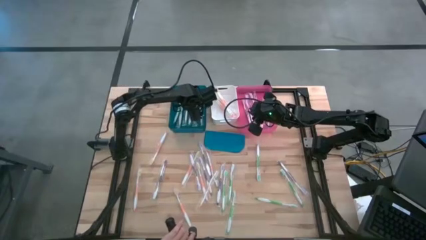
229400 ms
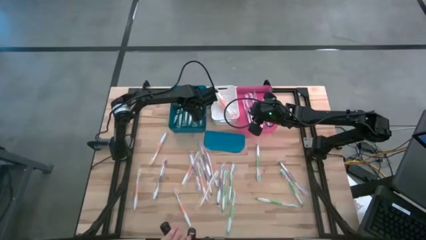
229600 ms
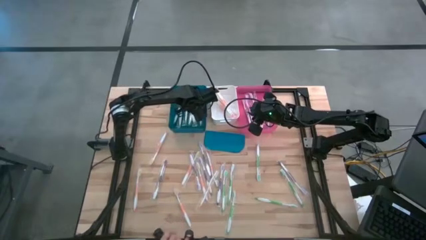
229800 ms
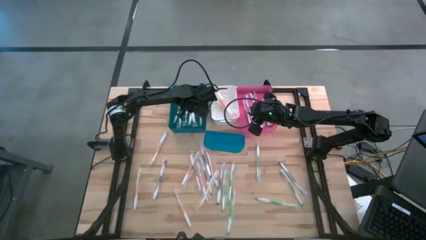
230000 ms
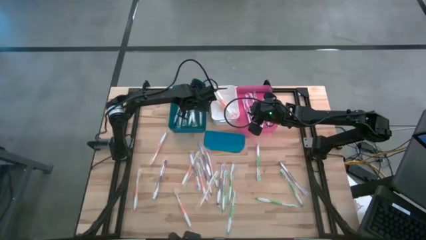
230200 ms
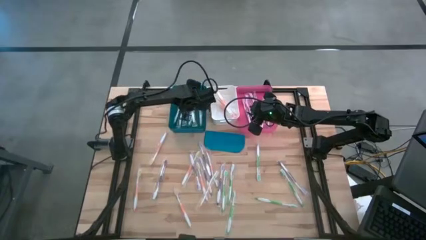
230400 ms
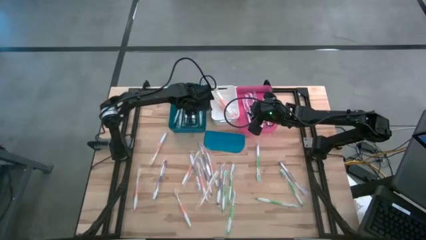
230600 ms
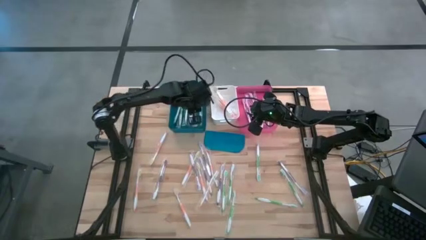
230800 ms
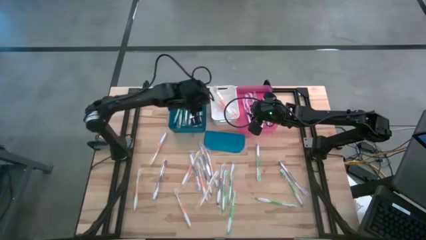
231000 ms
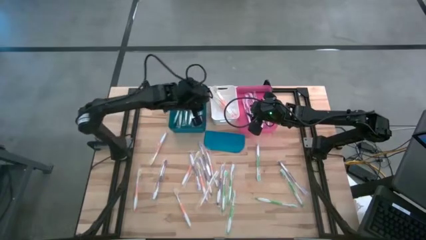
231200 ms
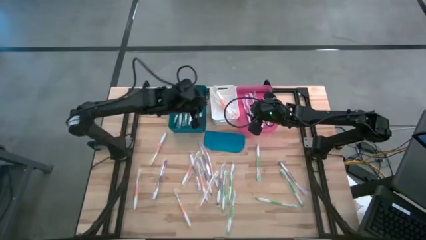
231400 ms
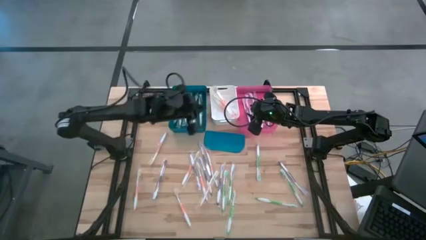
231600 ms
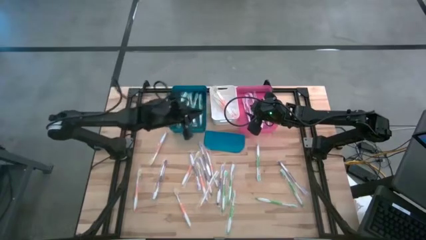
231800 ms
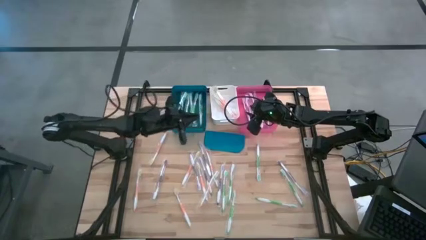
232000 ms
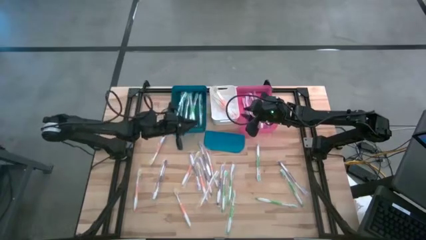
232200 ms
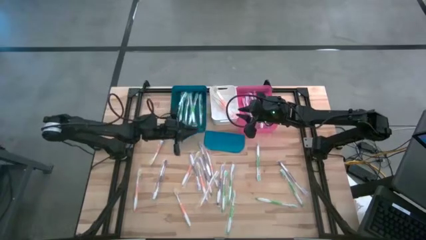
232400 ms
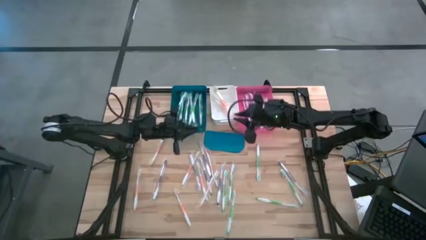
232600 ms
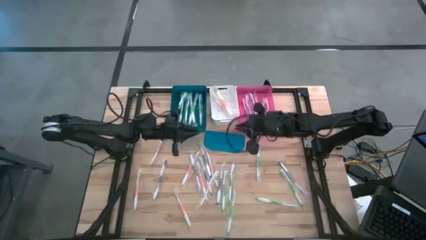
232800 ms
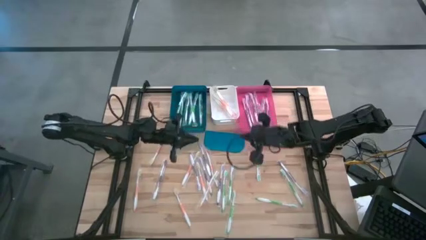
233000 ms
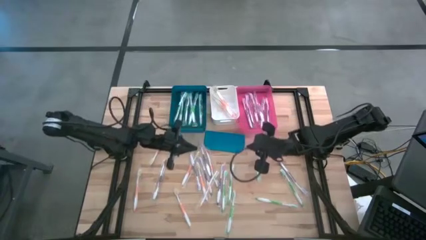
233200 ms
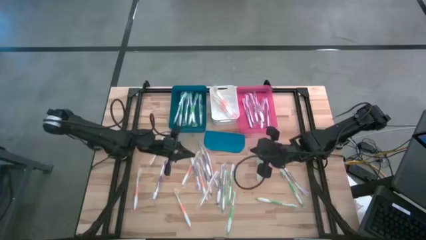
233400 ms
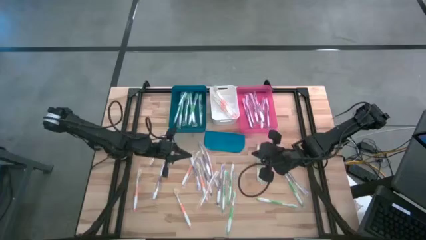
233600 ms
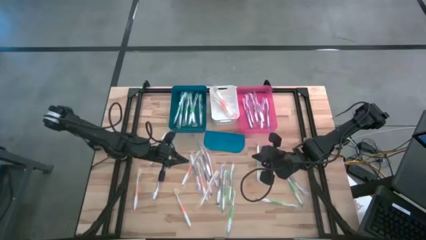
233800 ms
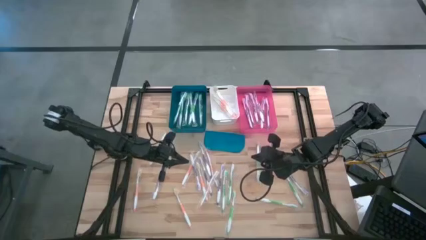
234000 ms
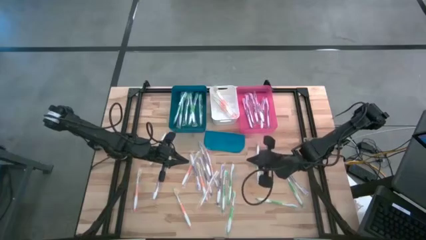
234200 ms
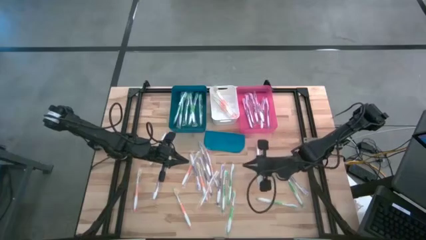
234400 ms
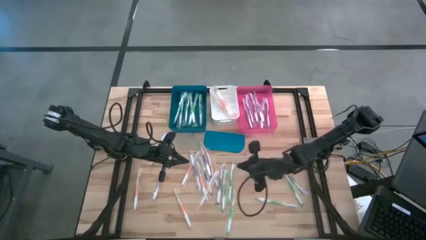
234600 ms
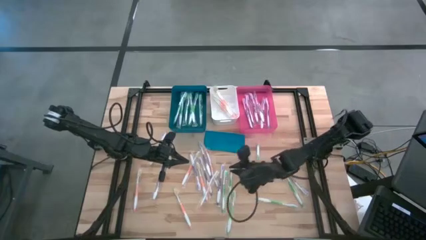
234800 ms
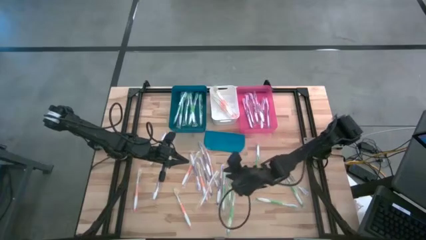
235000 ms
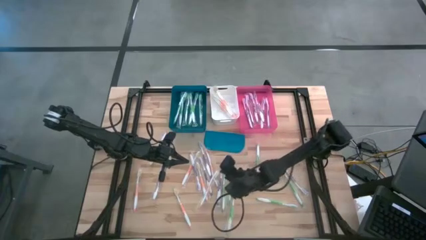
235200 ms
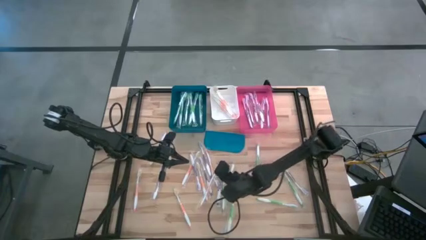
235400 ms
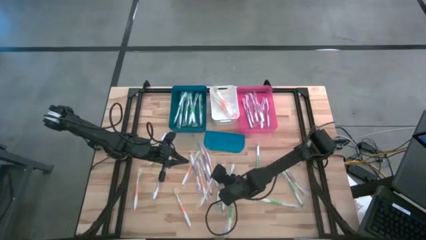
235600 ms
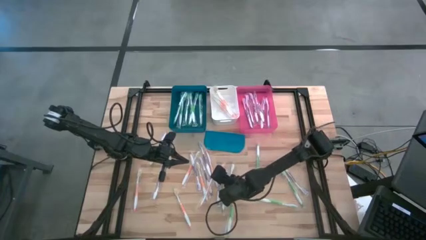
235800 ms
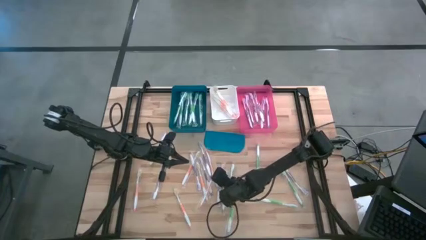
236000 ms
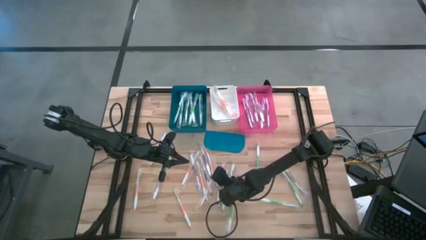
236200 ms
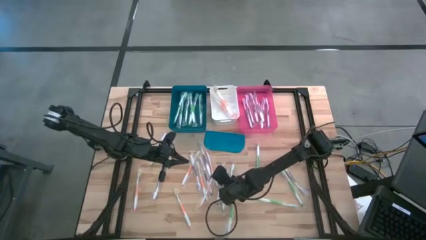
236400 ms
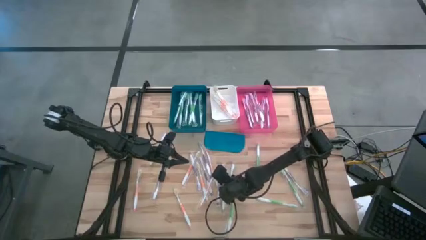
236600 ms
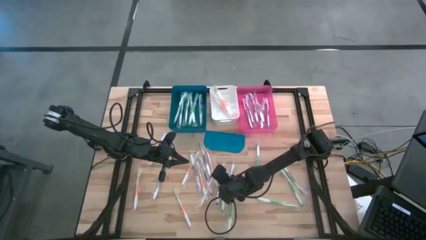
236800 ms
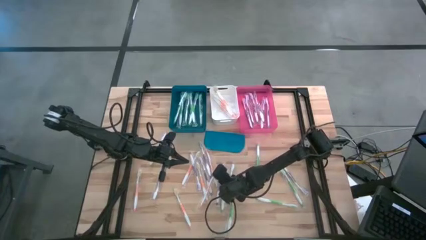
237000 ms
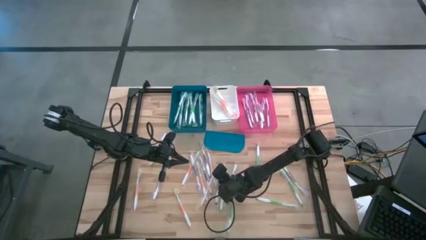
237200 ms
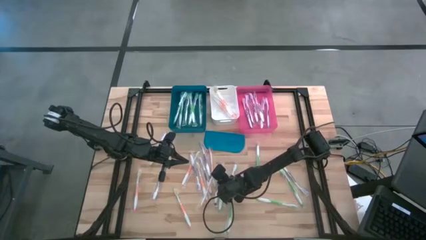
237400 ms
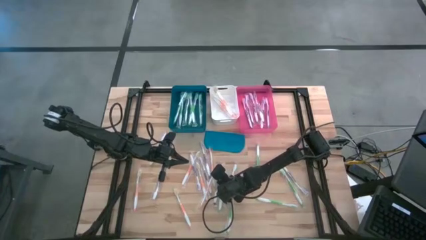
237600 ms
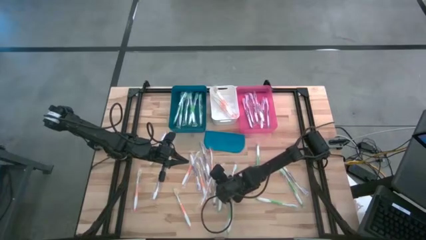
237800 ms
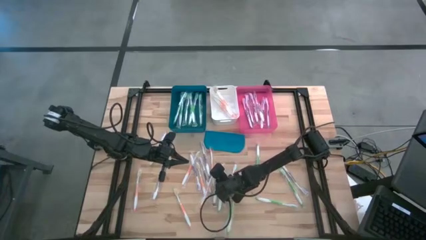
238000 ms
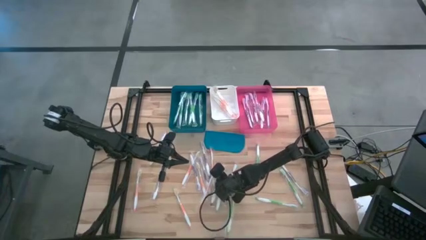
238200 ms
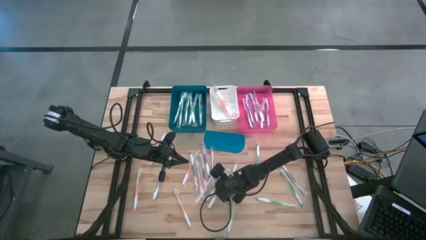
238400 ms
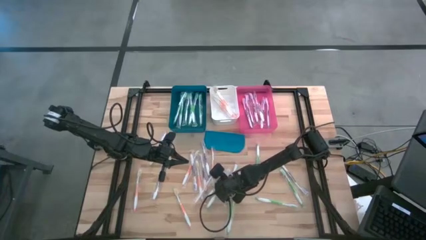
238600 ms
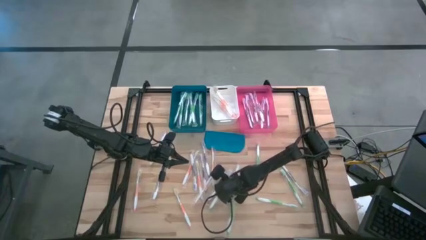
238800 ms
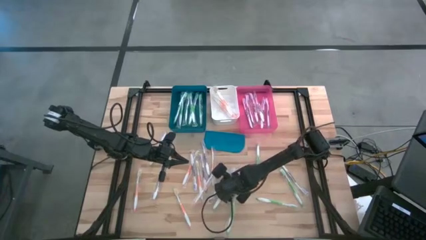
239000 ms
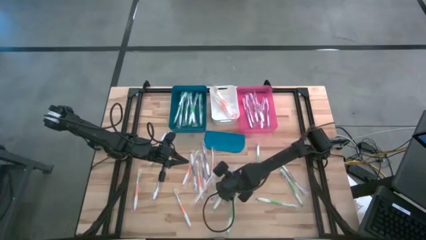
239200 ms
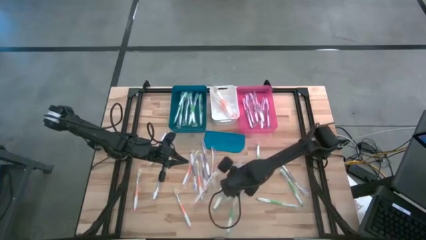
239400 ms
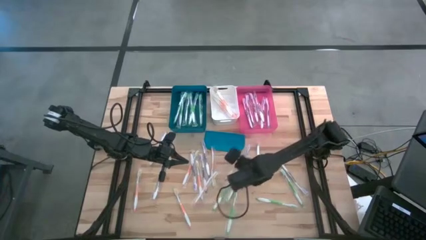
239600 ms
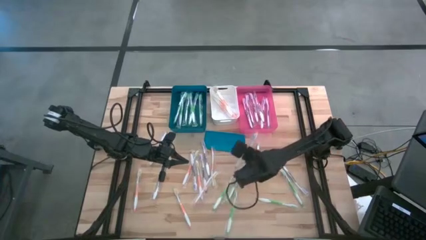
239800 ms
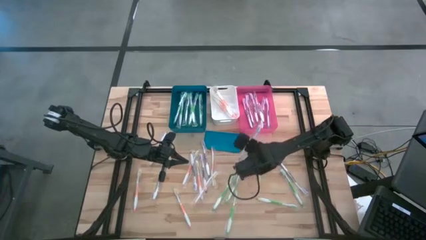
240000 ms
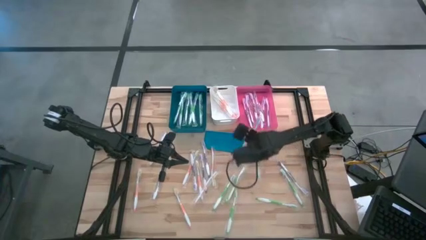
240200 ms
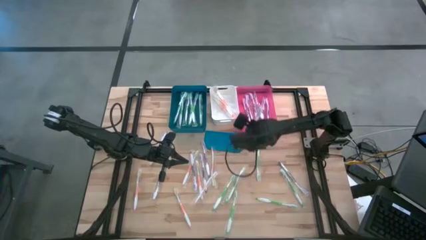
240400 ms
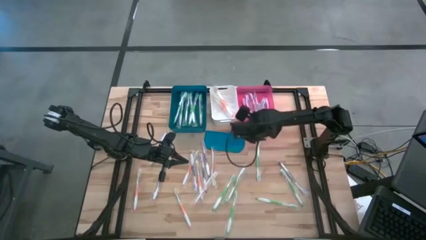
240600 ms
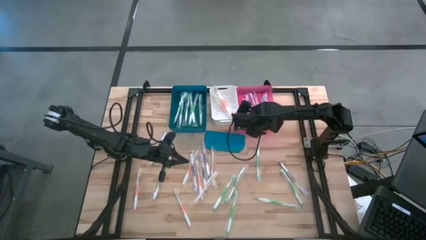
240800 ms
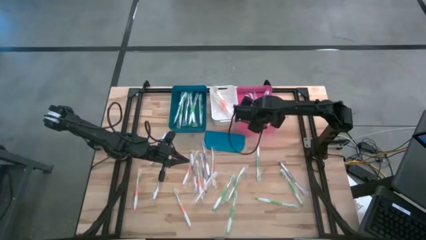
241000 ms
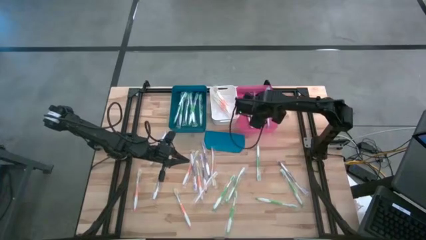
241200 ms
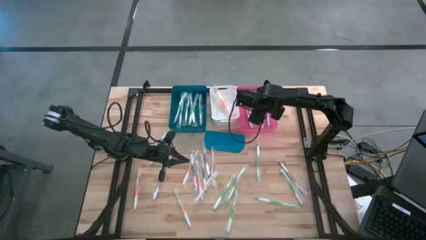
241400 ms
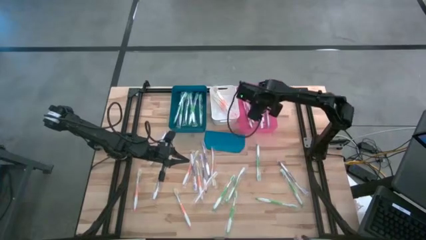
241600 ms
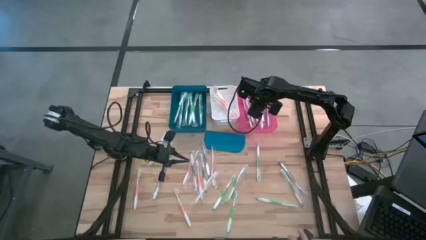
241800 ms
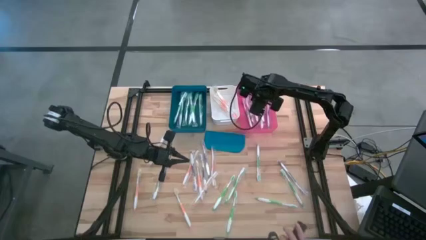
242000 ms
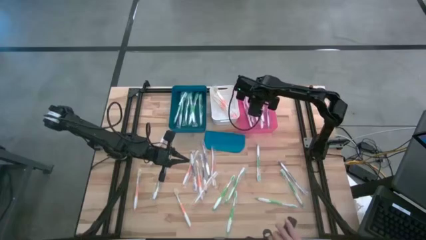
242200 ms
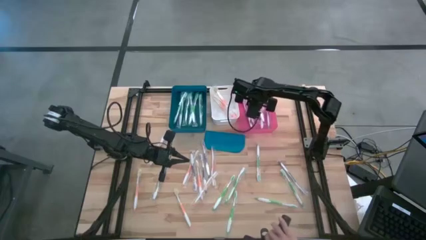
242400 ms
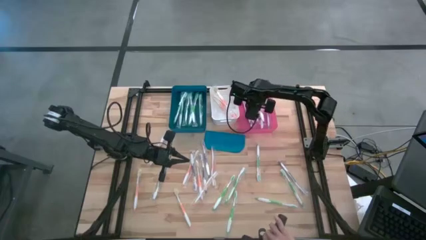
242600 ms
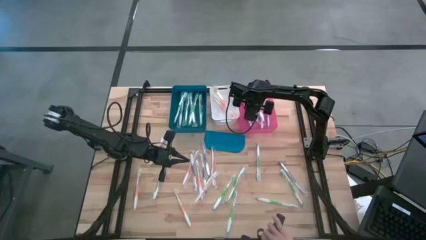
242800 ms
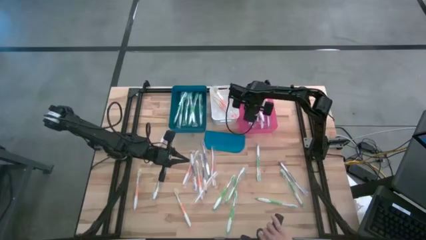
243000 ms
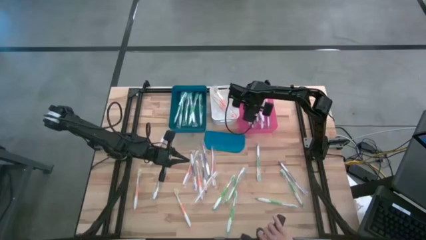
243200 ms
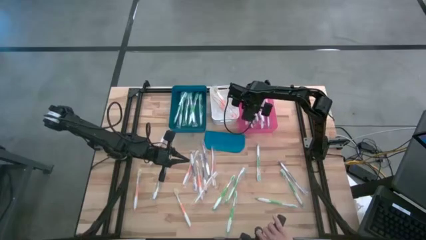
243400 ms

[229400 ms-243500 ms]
Task: Pick & Place Toothbrushes
Put the purple toothbrush into the pink bin
